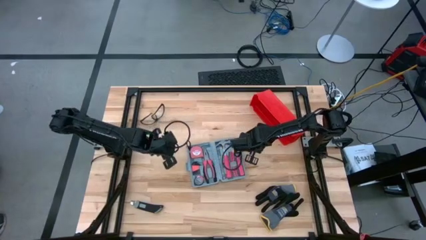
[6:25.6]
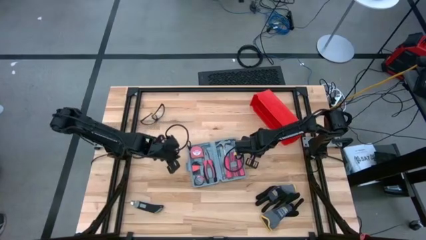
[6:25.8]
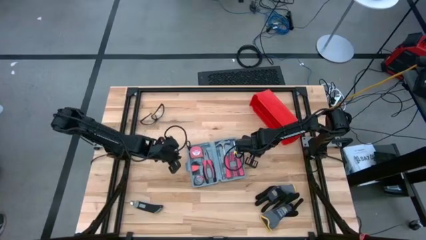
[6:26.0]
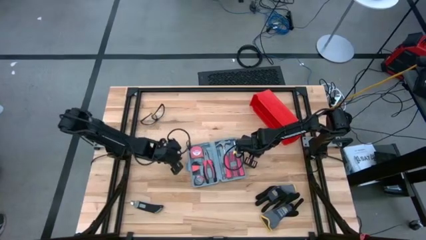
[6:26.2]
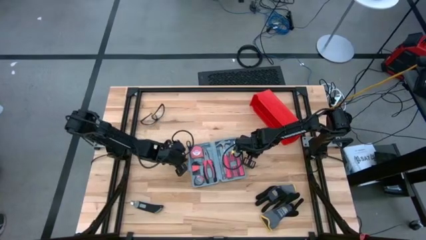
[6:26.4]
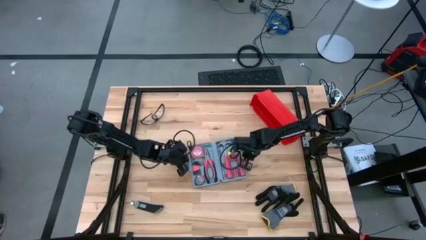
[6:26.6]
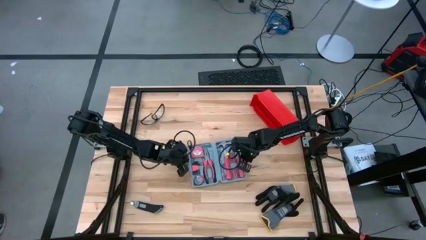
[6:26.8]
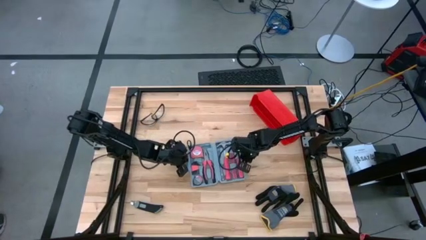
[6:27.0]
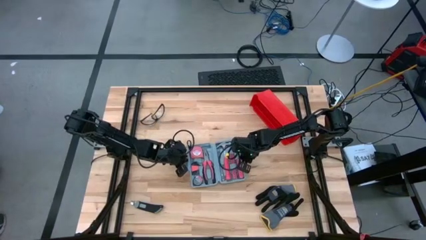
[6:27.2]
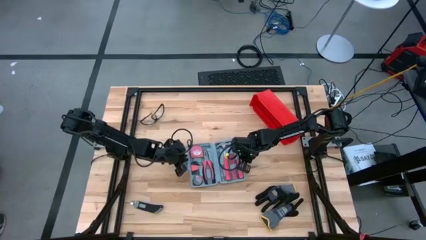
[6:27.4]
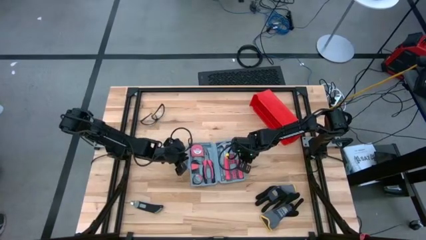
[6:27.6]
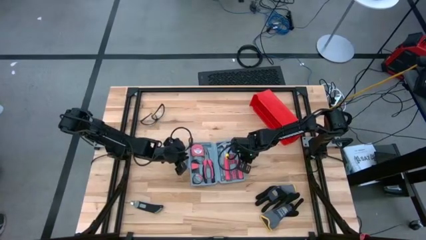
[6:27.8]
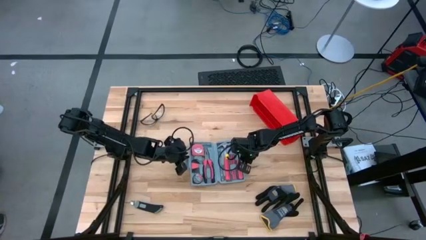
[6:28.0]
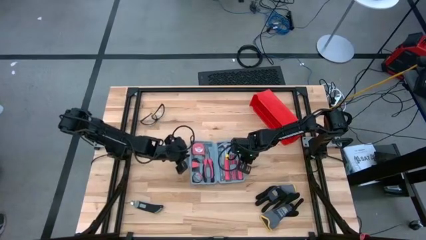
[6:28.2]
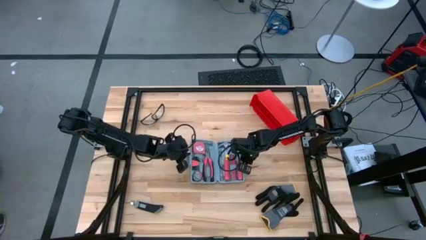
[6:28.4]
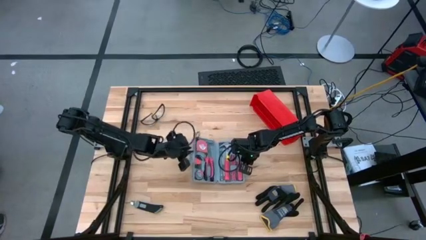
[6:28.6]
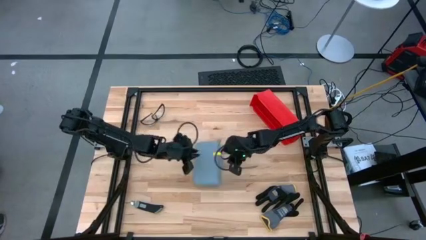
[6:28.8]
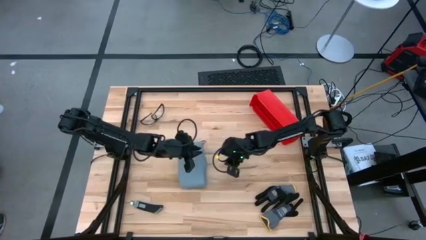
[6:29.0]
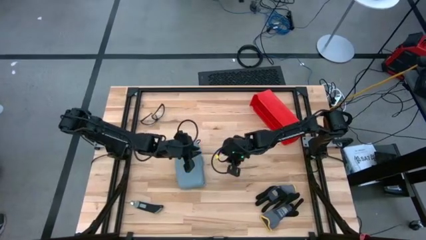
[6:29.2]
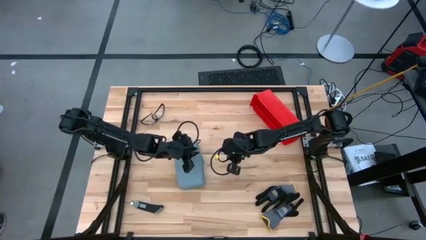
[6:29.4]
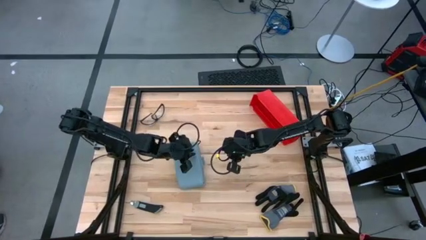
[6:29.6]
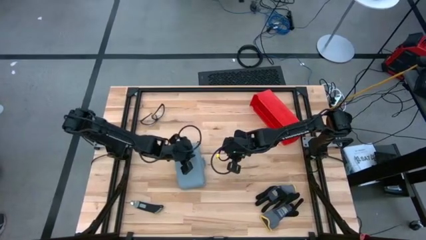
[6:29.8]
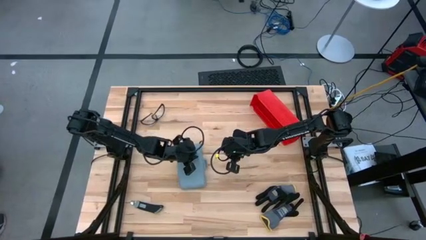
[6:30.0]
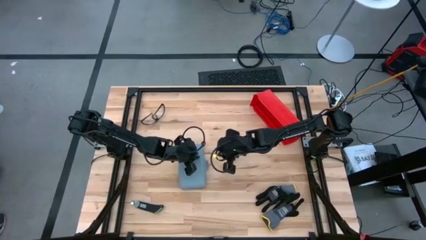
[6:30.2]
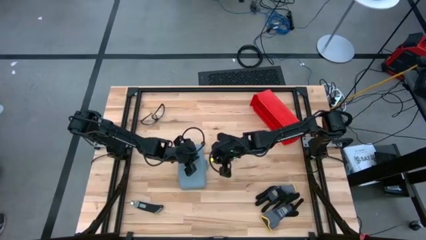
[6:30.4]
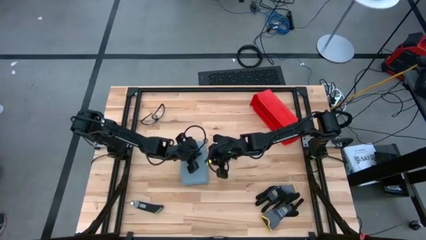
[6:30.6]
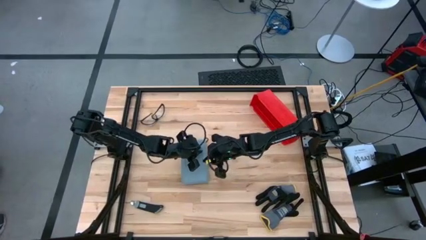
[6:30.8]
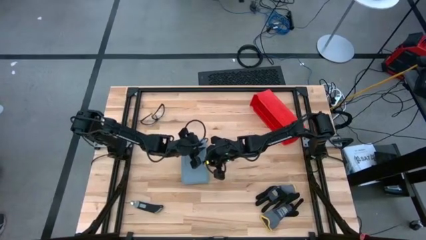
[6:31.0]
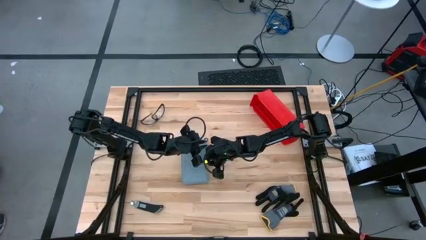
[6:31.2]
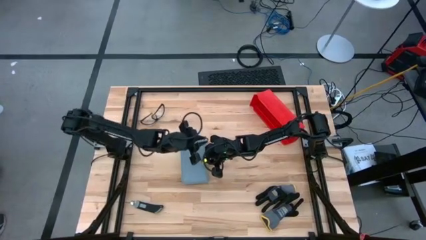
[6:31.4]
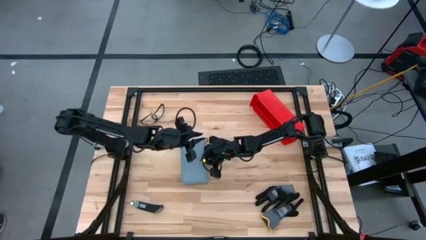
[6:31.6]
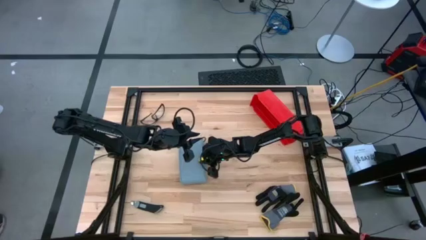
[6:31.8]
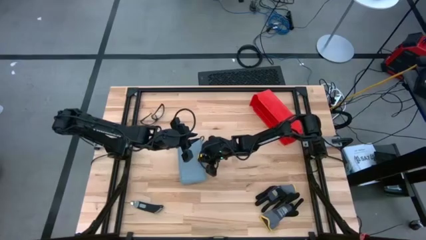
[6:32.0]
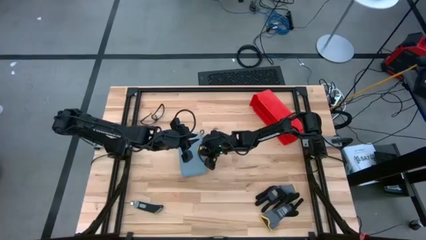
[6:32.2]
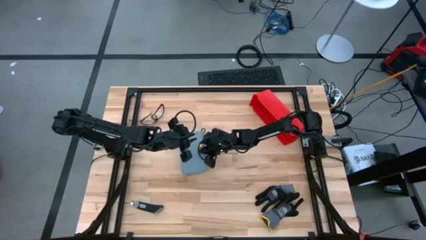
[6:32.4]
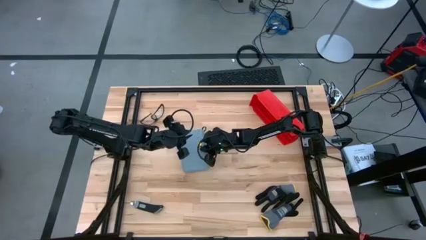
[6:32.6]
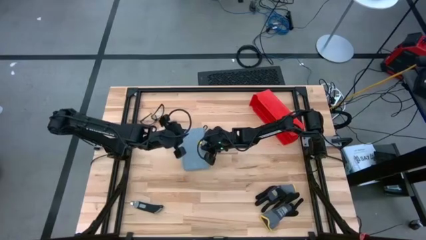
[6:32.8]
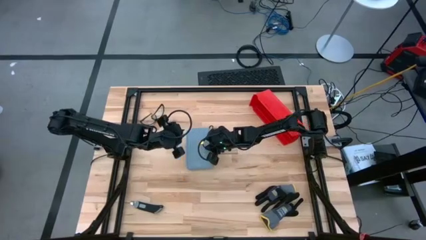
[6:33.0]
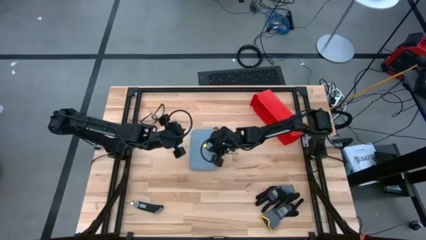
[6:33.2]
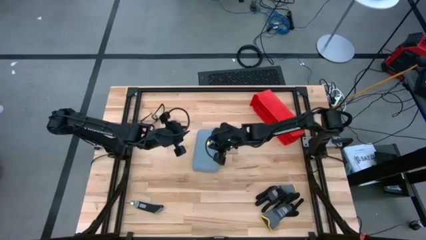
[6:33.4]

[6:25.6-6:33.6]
Task: prefit tool cases
Close the toolbox

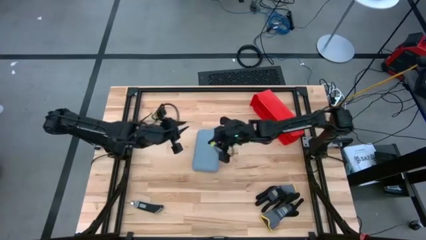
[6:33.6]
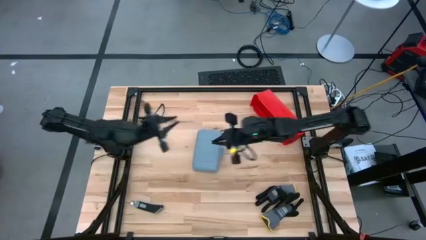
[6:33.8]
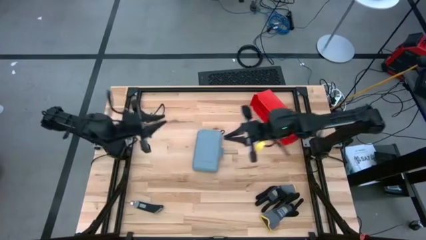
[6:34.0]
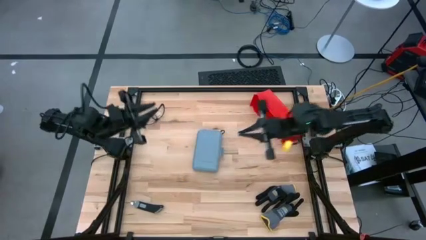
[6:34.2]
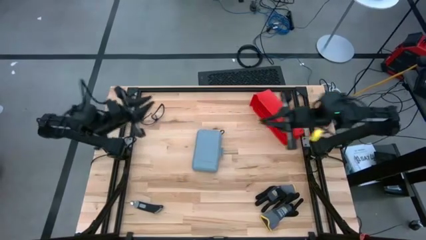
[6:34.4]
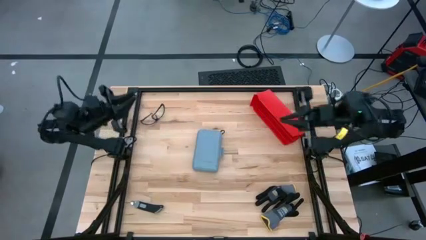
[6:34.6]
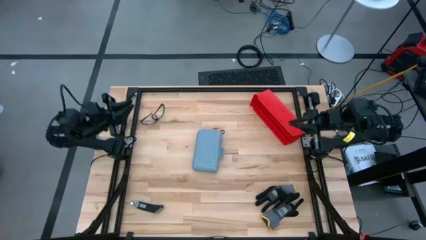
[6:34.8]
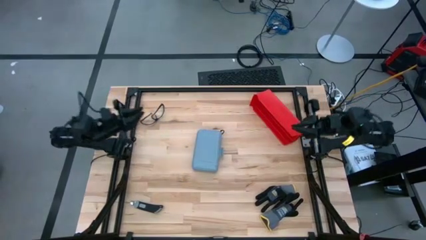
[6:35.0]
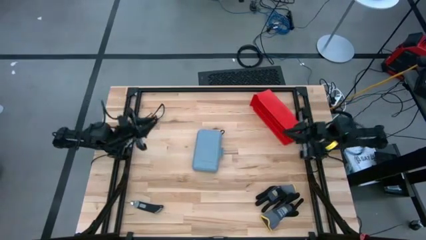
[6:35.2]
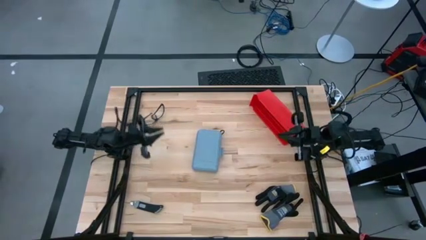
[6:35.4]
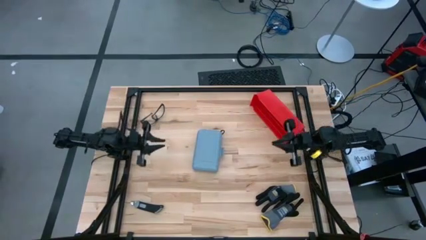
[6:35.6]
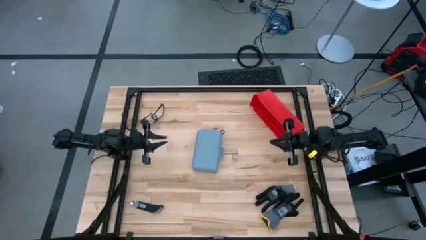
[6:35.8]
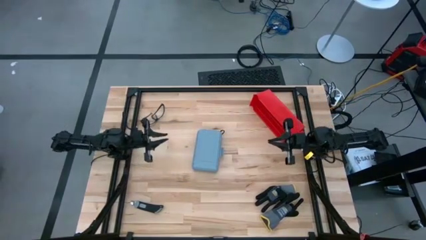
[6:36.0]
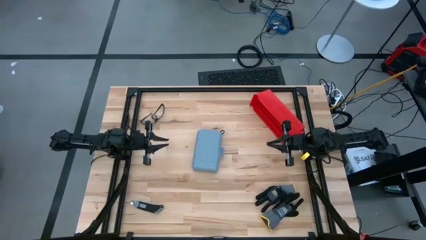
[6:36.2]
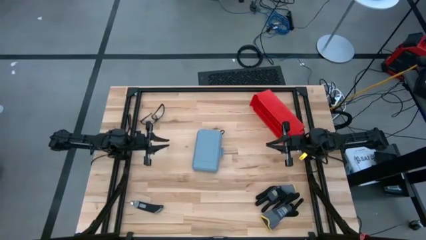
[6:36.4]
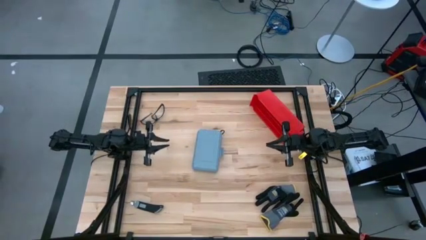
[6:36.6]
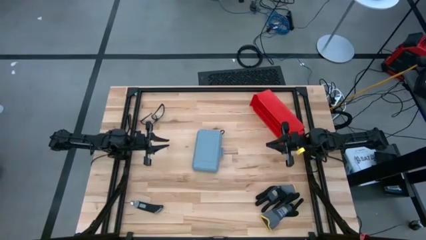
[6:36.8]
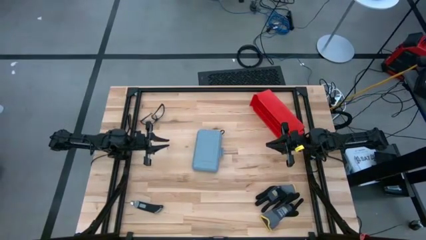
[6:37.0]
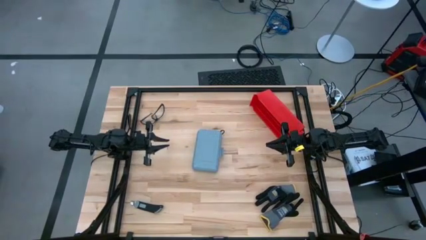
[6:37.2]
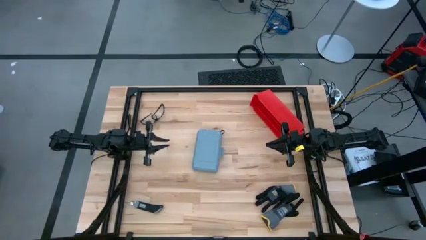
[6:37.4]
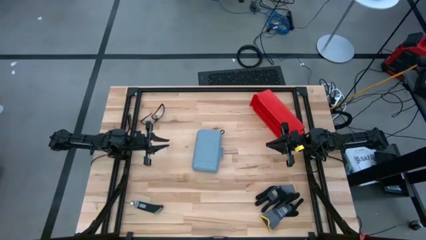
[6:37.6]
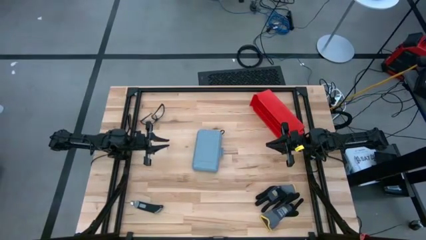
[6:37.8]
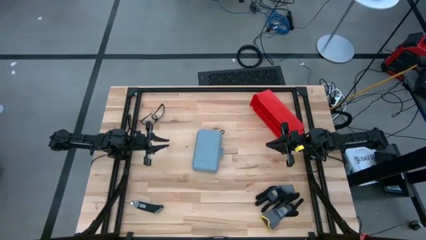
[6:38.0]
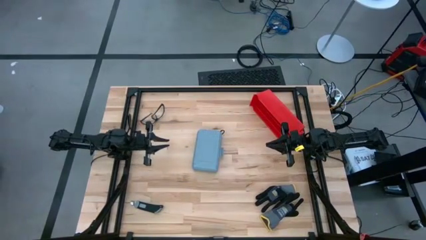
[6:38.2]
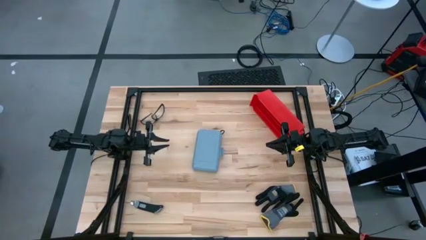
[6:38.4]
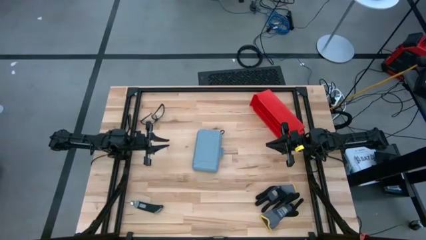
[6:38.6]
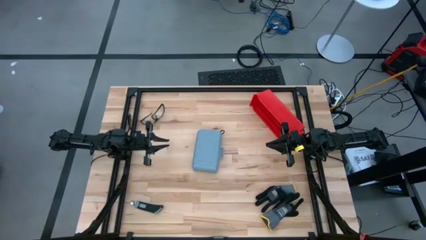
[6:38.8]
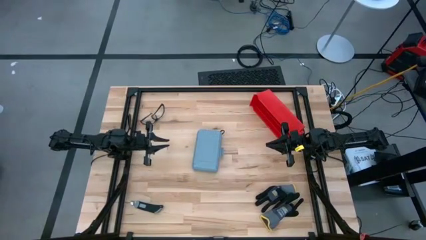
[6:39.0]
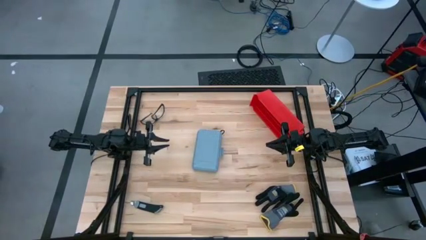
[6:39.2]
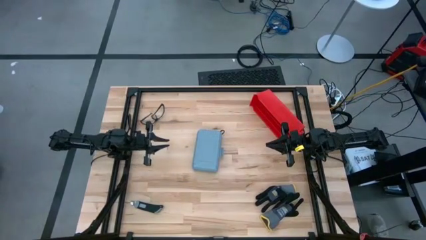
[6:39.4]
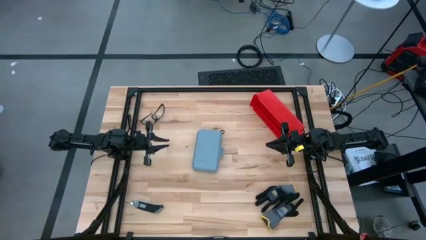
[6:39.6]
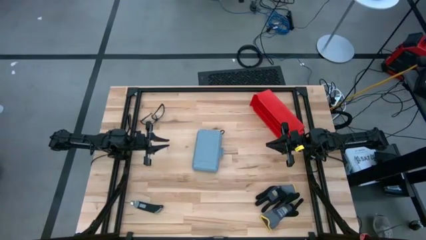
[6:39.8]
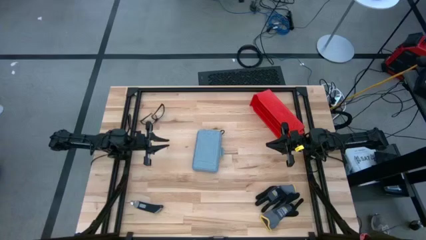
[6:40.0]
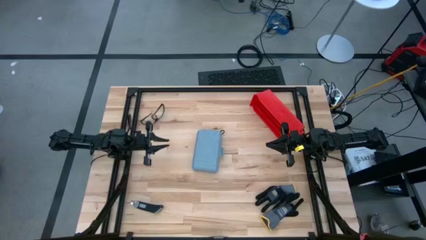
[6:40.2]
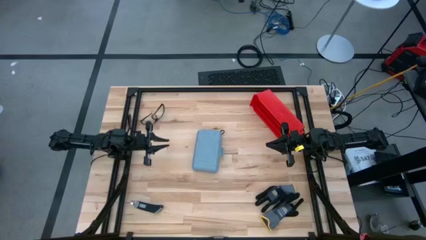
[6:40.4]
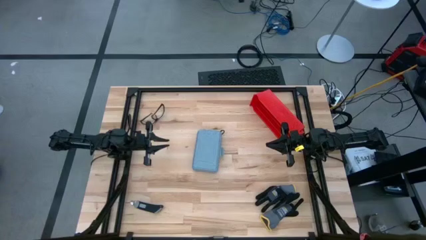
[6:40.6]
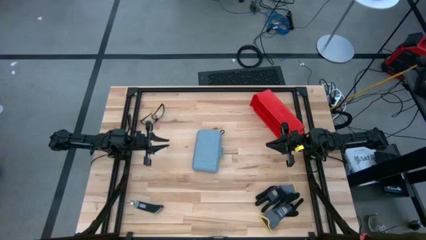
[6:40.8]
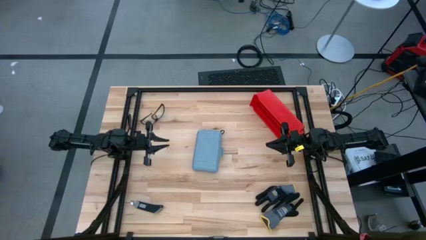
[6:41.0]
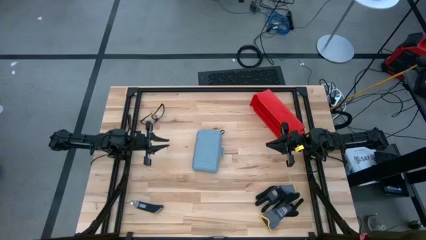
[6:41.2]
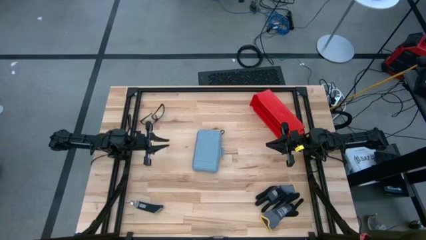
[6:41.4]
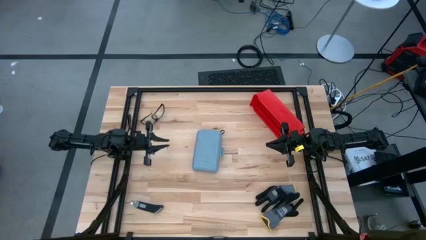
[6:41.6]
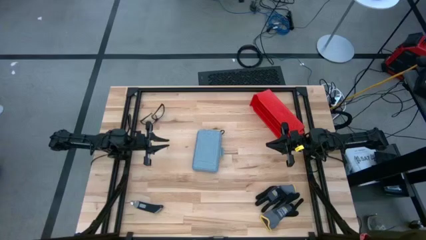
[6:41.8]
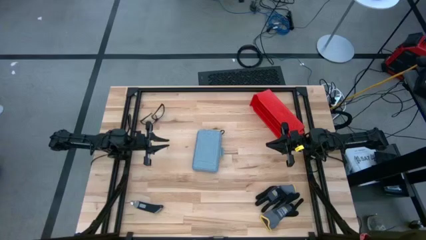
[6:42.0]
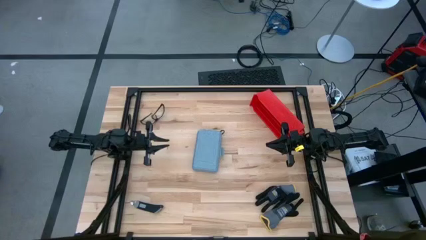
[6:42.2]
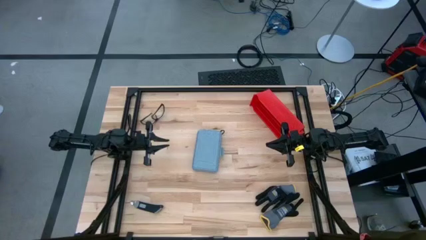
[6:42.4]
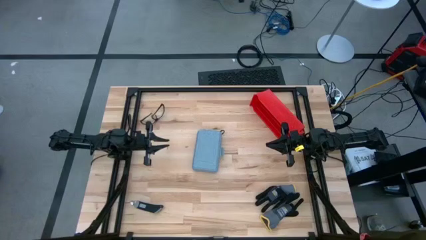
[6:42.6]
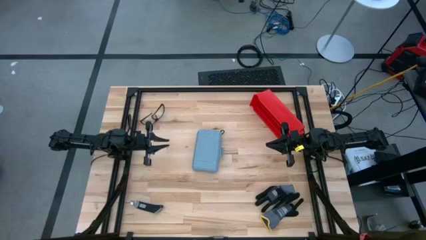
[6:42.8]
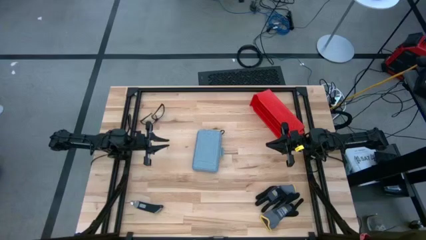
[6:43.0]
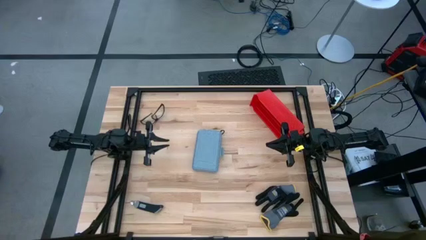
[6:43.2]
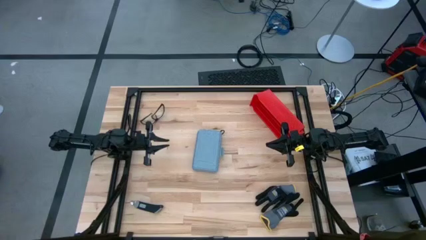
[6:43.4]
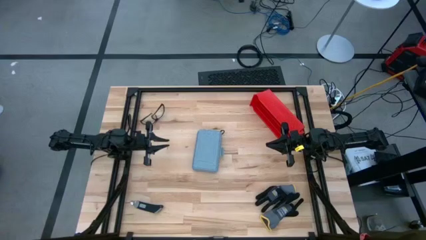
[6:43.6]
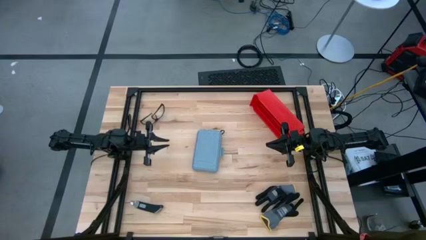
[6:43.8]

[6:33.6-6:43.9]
Return to Home Position
